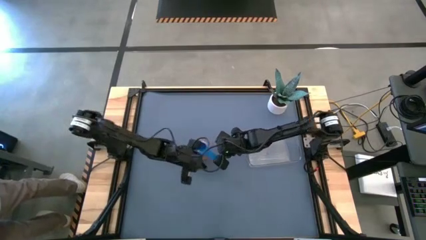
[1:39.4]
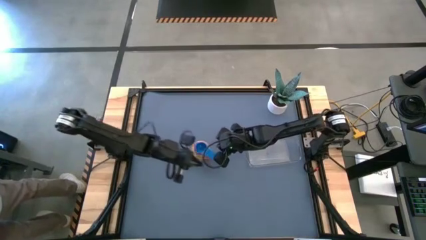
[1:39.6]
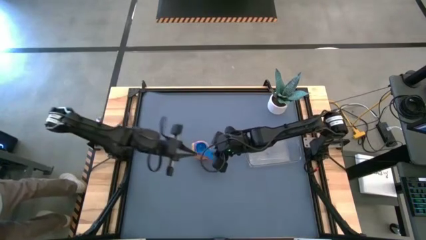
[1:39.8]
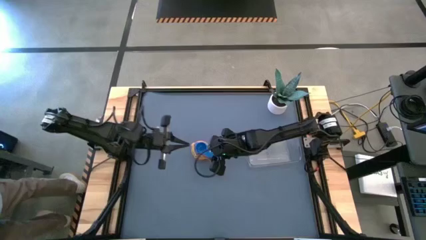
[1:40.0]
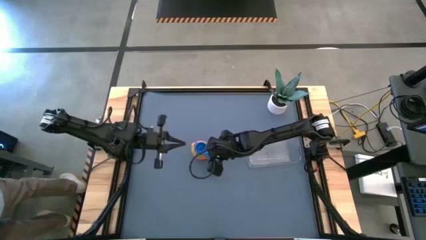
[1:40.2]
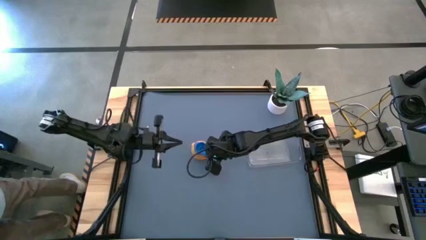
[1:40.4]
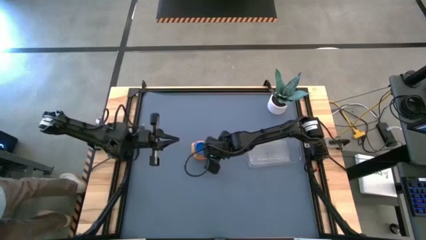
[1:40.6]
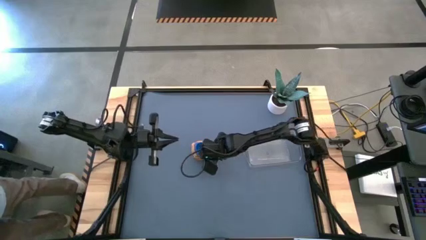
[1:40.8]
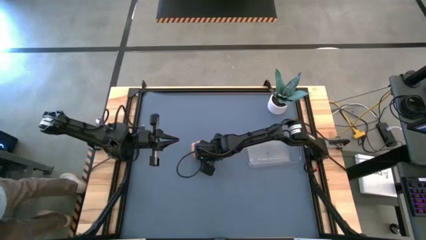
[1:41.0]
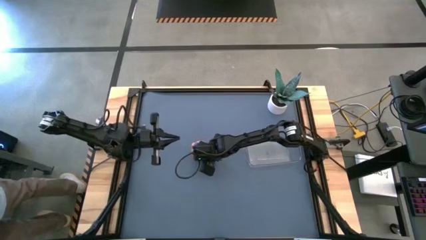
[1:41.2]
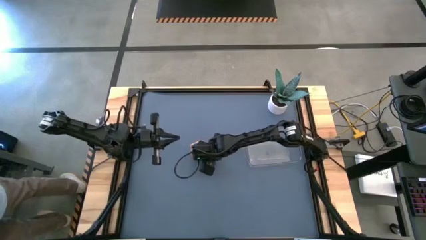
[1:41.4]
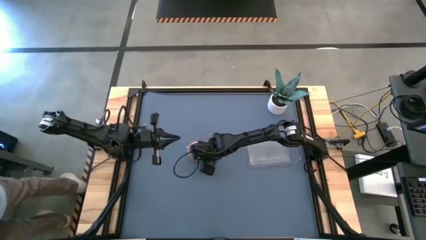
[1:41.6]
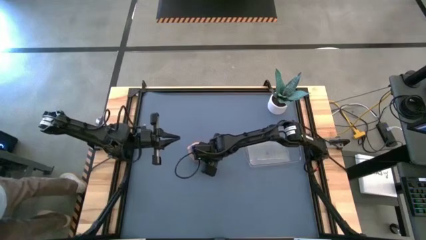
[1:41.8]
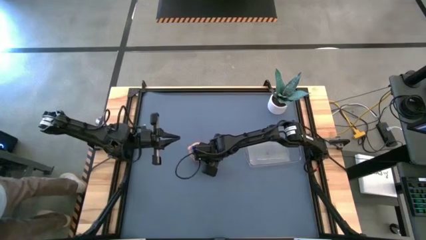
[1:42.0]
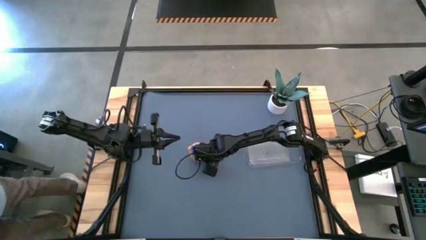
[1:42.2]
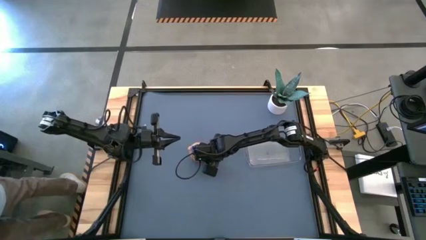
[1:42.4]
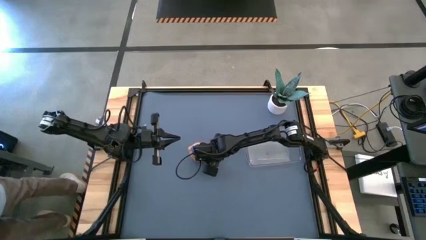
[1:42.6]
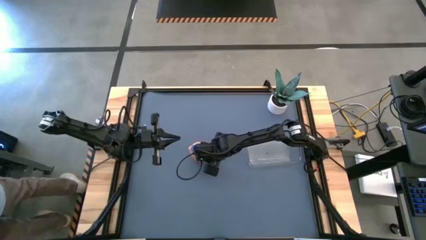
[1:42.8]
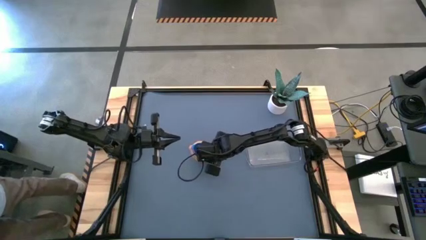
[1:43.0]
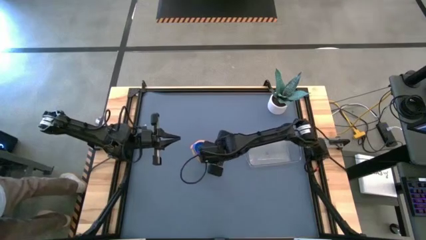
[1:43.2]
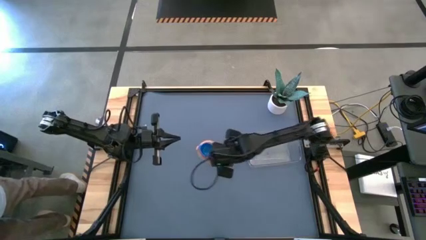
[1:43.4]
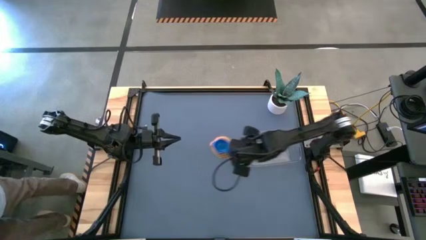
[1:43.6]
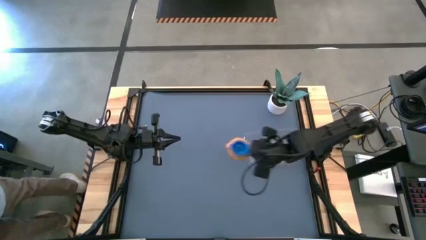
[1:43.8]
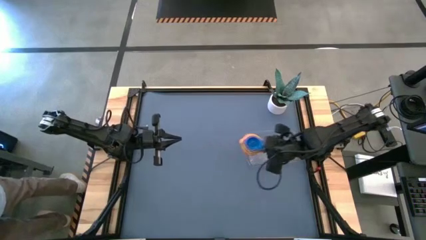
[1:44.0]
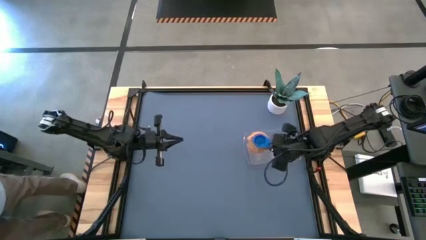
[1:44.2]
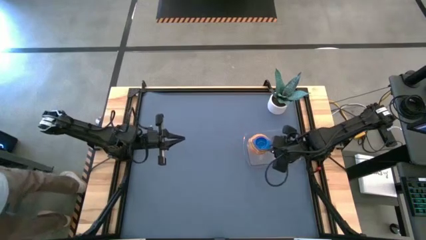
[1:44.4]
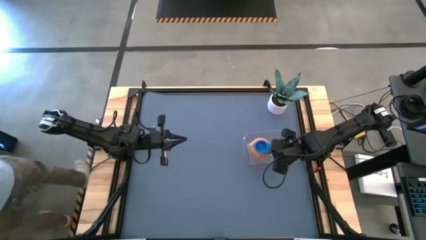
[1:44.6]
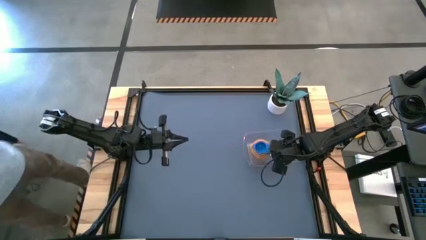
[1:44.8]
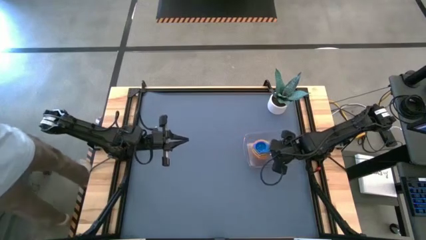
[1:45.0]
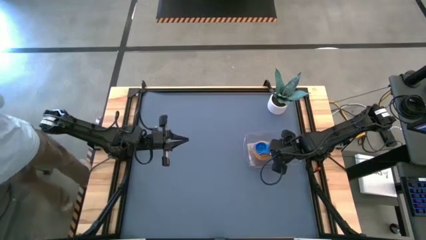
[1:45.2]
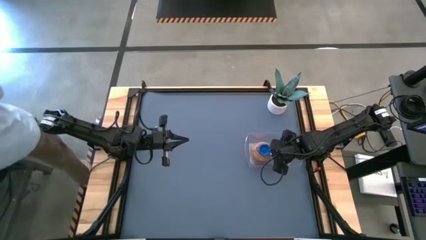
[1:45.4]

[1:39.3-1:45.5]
Task: Nest measuring cups in basket
Put the stacked measuring cups into the transparent bin

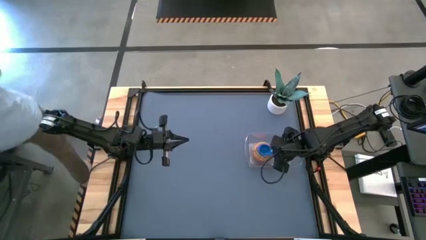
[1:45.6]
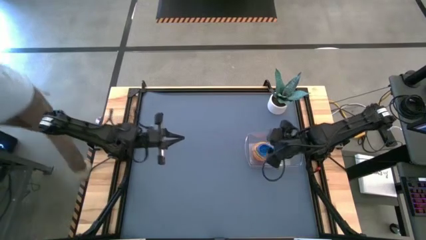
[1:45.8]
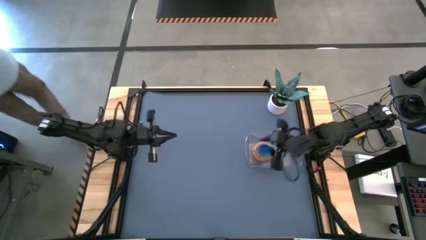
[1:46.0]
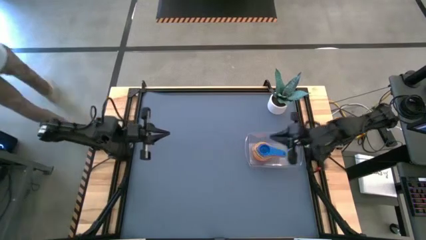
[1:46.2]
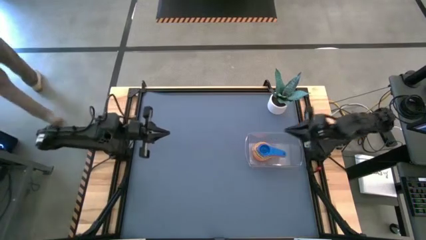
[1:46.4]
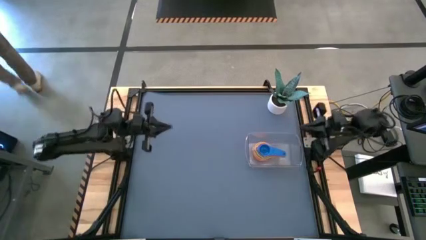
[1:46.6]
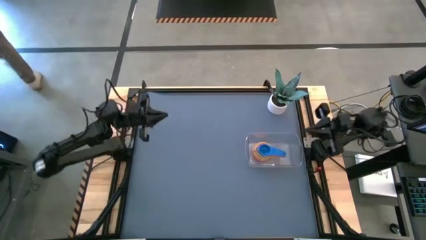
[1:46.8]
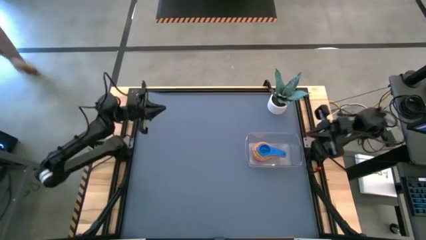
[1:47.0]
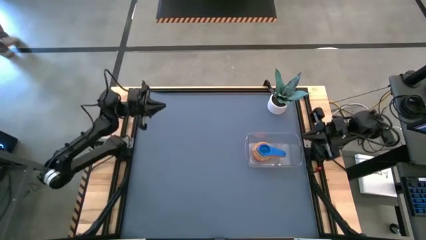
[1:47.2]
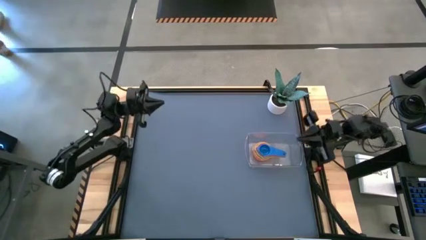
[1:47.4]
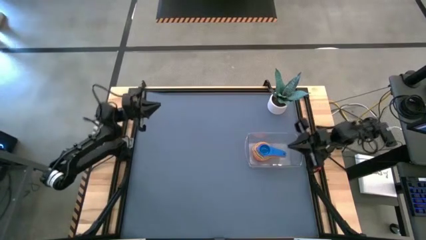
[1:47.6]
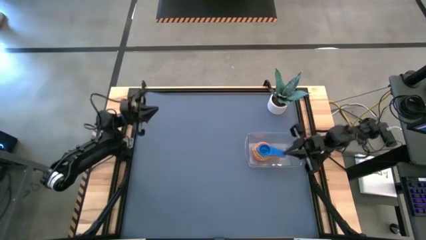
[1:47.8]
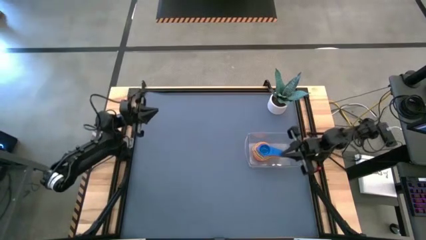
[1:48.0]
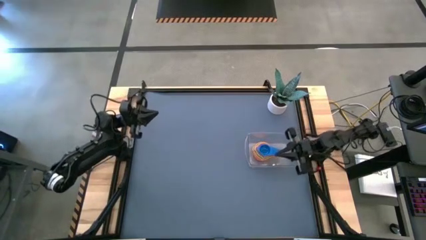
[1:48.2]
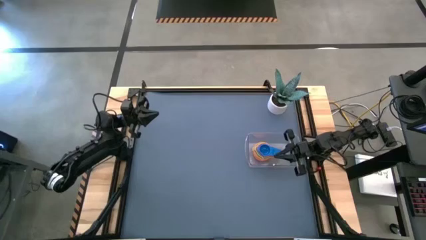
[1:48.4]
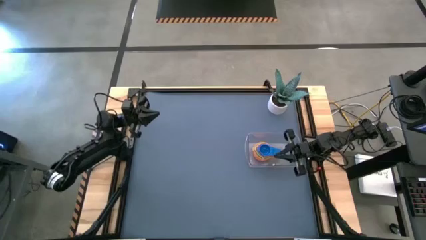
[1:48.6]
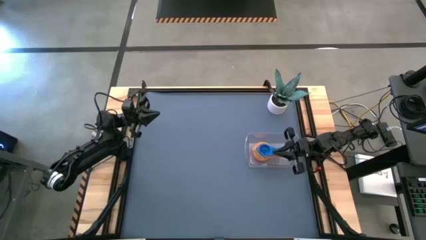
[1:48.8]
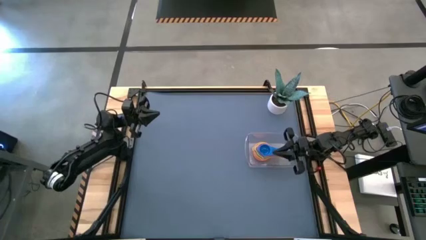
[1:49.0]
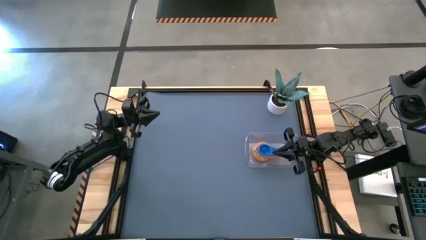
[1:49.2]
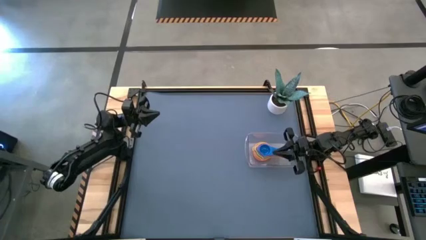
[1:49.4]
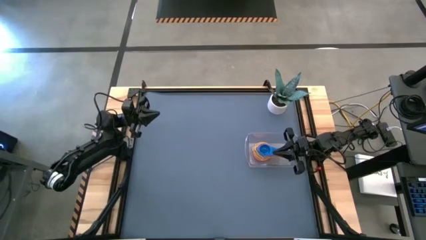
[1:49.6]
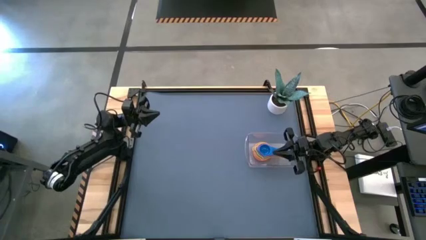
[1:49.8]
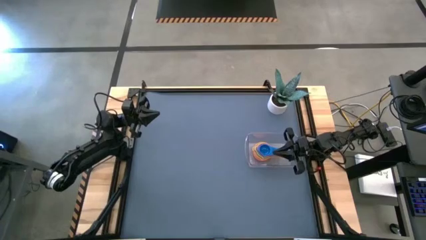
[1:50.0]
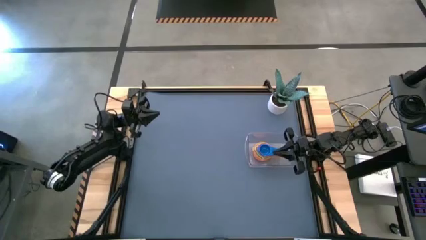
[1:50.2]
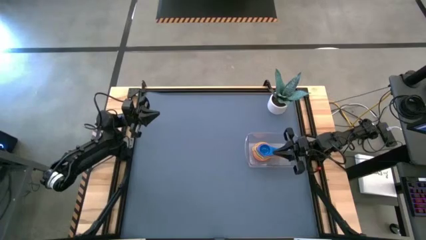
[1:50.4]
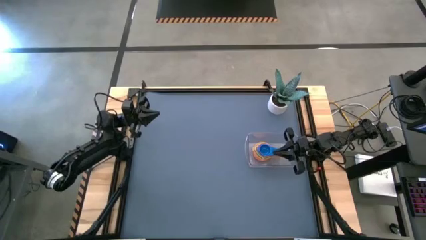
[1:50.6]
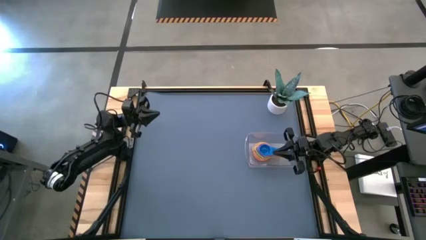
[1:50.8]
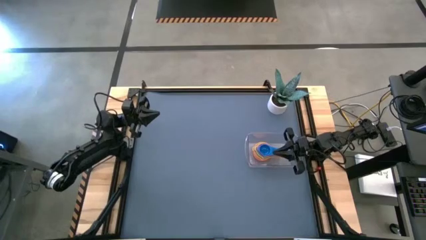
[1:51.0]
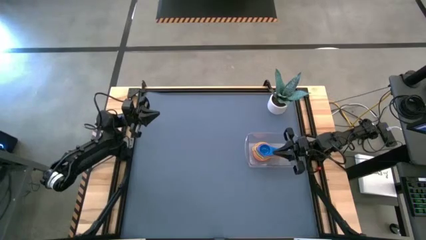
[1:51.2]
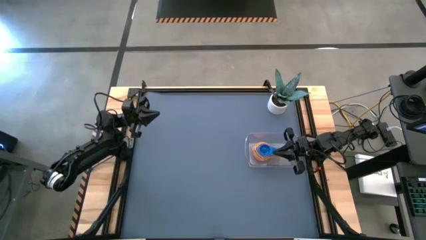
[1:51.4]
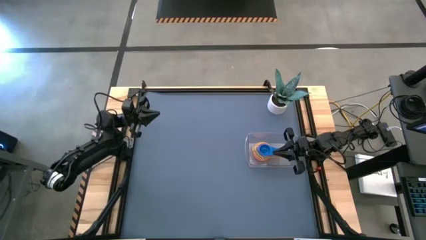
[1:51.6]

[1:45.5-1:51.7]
Return to Home Position

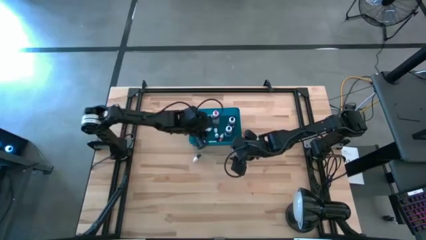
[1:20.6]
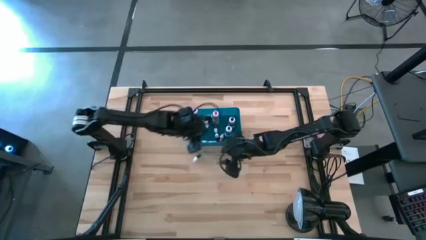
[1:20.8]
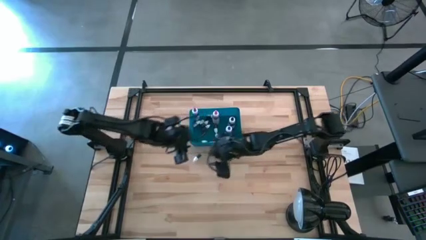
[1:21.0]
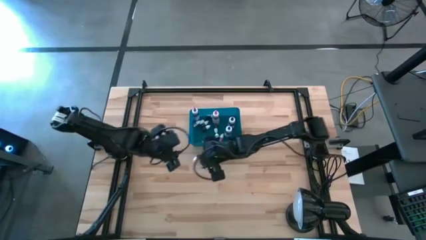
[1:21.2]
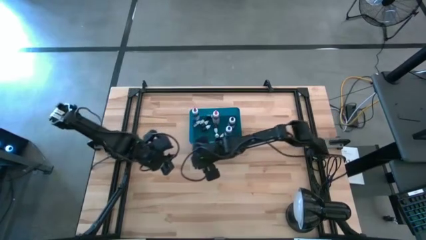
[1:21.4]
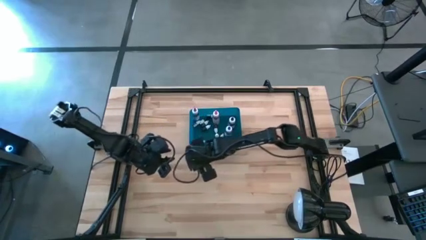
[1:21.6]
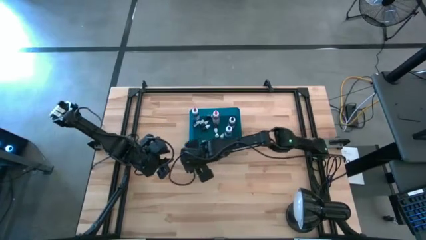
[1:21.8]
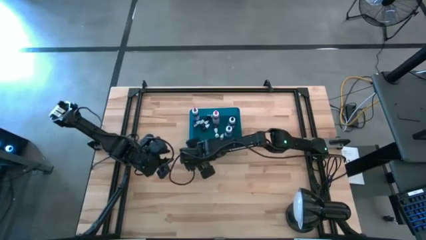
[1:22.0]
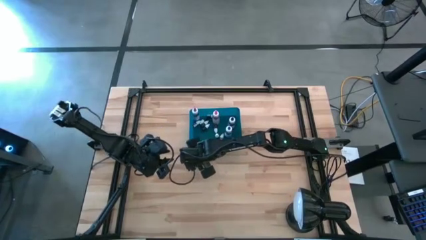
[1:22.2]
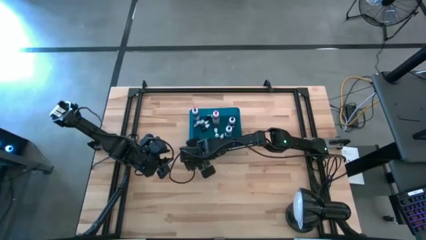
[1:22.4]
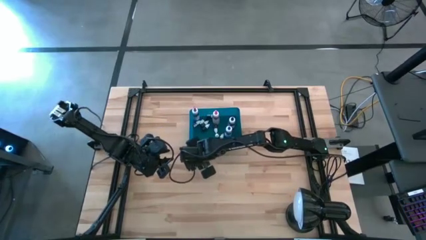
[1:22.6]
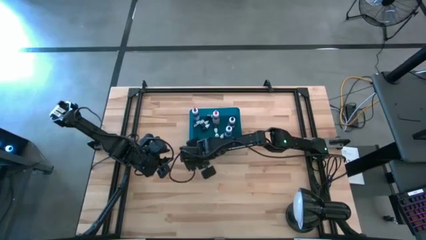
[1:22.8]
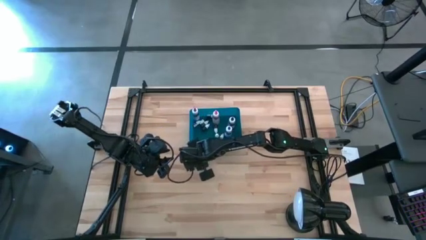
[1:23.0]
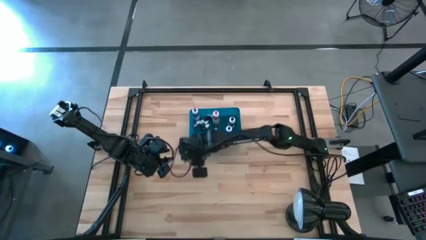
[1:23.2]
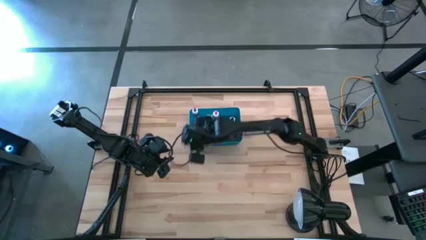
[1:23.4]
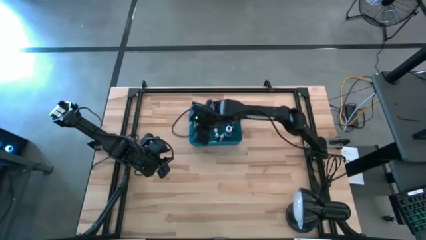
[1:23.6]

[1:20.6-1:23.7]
Task: Pick & Place food coloring
Put the small black food coloring bottle into the bin
